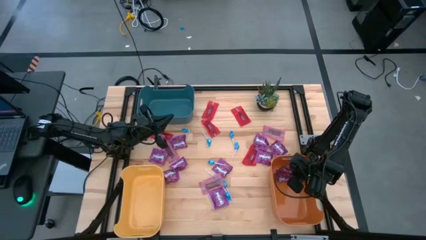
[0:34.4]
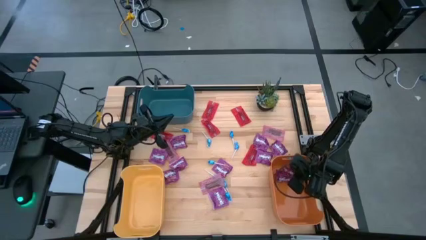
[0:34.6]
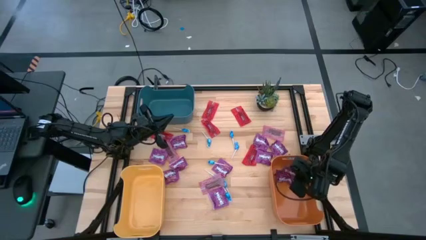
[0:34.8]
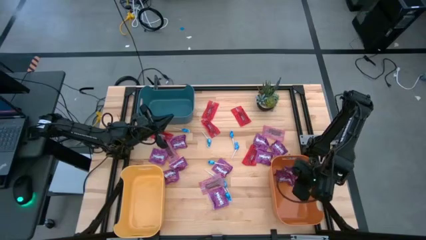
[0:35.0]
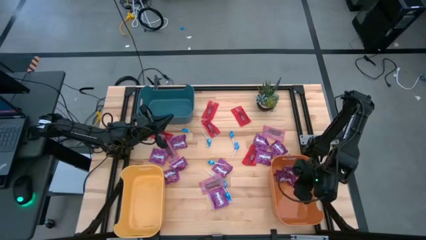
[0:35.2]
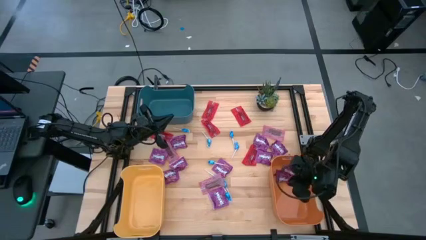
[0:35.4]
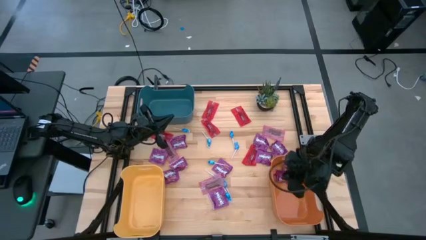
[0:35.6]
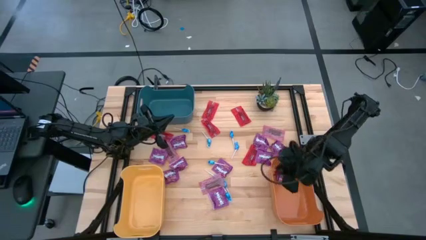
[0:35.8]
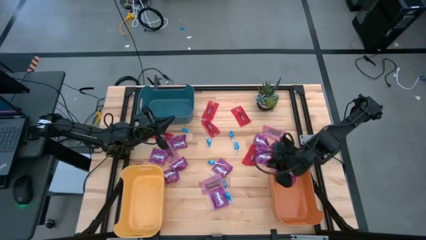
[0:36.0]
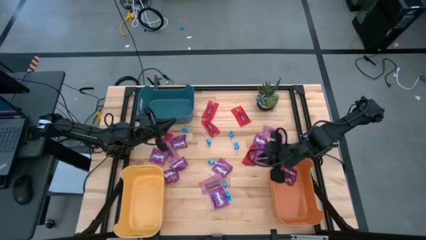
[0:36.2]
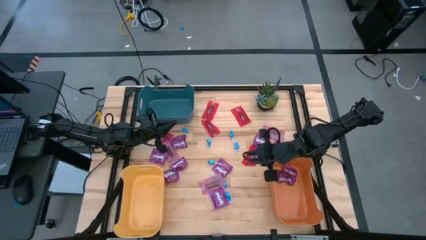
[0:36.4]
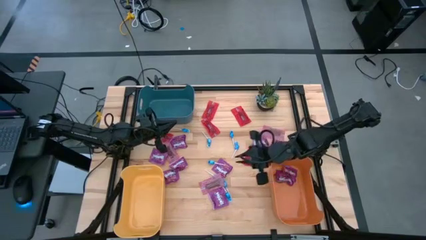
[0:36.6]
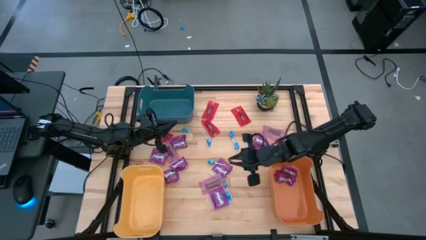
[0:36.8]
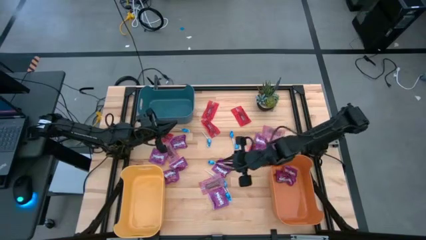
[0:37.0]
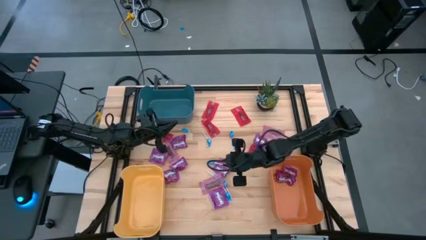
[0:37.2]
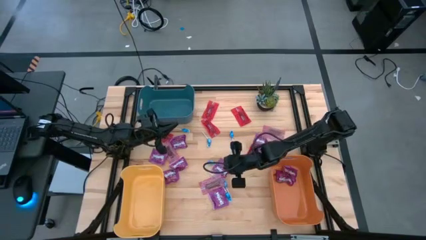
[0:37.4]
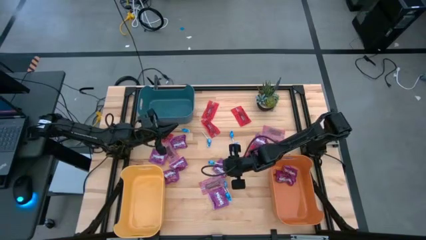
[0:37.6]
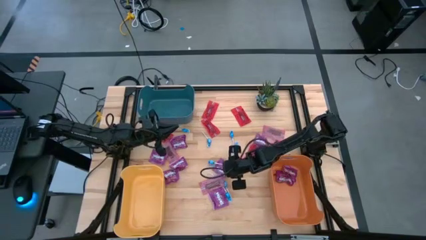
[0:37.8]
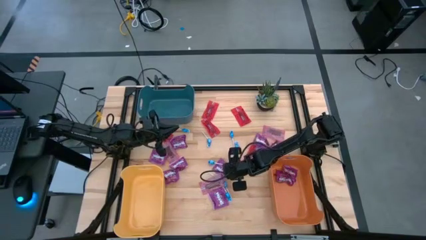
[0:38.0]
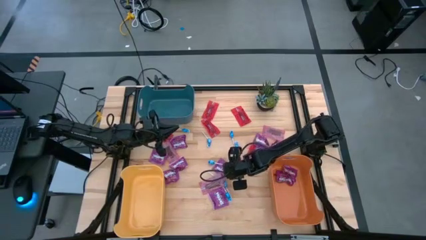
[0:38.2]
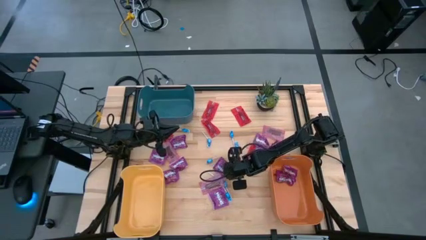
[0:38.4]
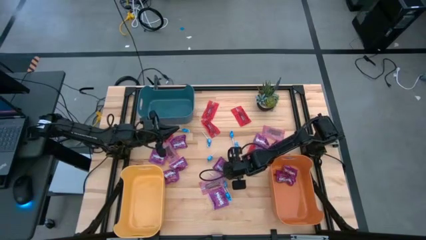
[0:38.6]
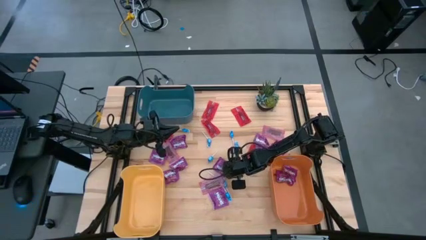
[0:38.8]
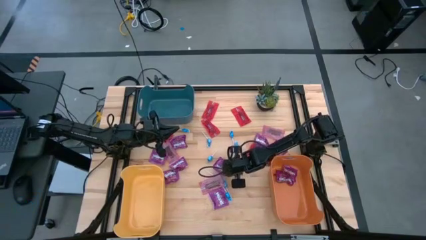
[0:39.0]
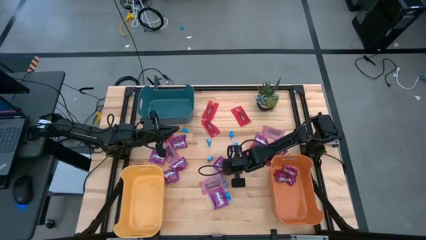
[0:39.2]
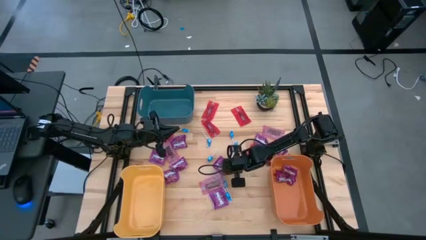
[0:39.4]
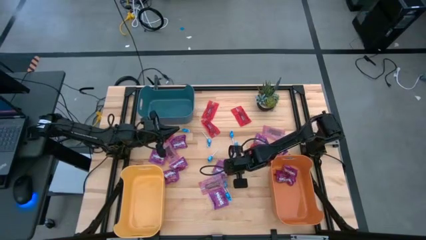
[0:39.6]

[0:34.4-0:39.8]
Task: Sort candy
Put the purple candy into the orange bin

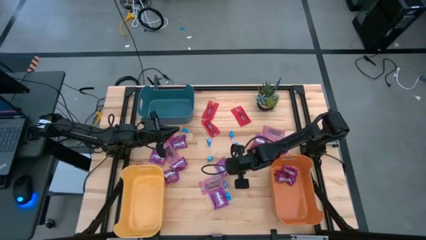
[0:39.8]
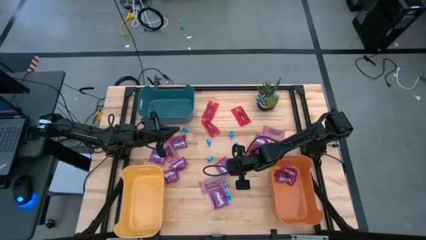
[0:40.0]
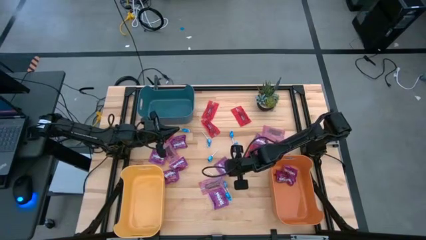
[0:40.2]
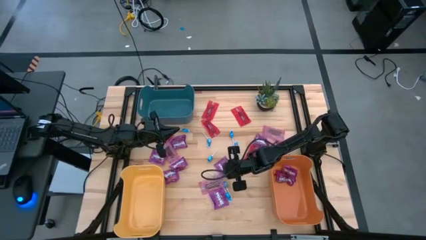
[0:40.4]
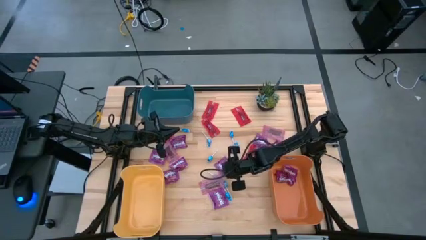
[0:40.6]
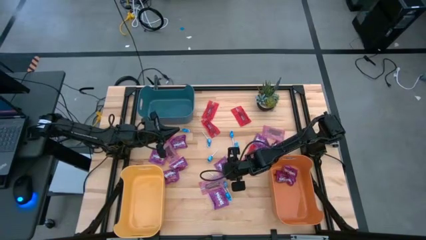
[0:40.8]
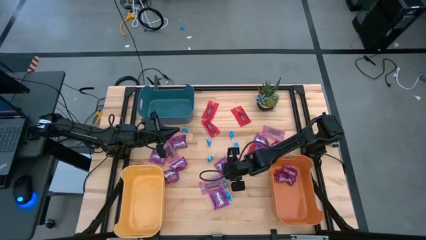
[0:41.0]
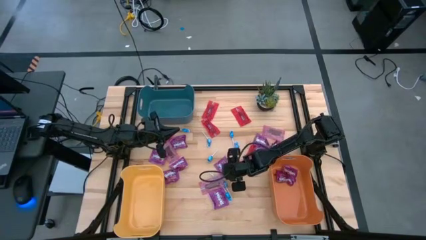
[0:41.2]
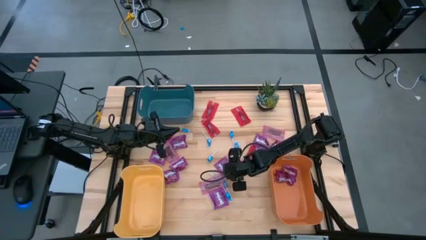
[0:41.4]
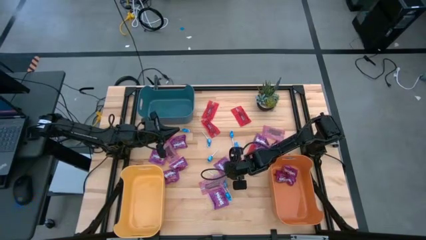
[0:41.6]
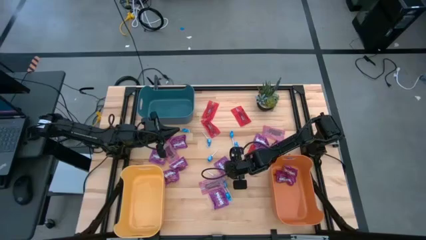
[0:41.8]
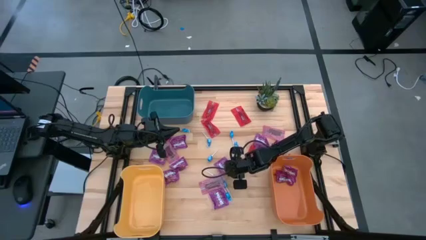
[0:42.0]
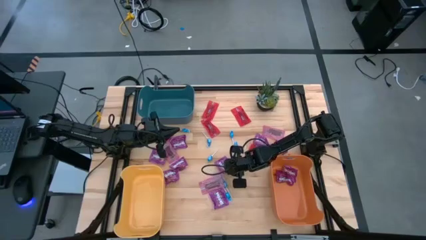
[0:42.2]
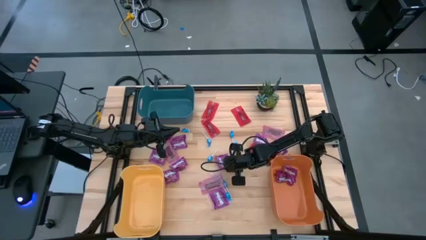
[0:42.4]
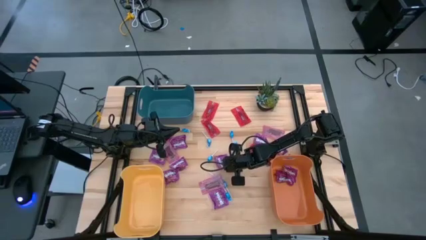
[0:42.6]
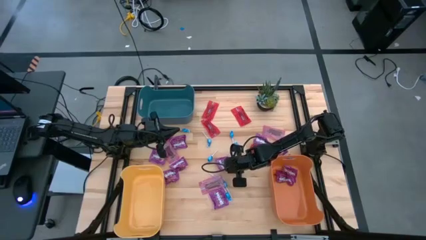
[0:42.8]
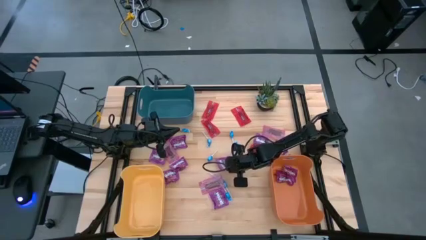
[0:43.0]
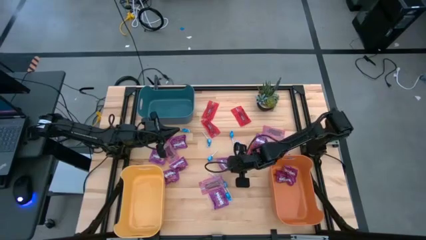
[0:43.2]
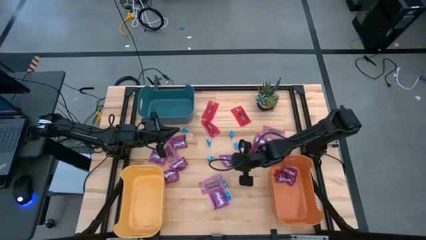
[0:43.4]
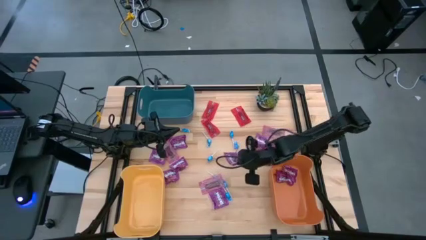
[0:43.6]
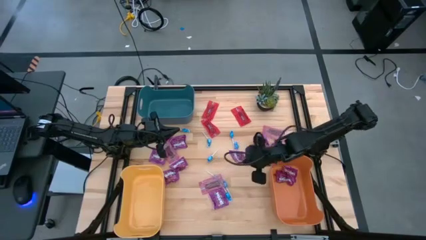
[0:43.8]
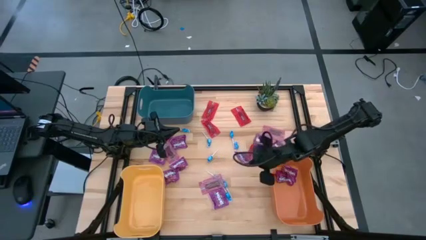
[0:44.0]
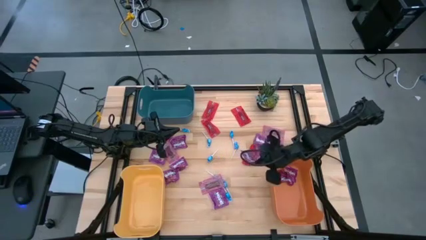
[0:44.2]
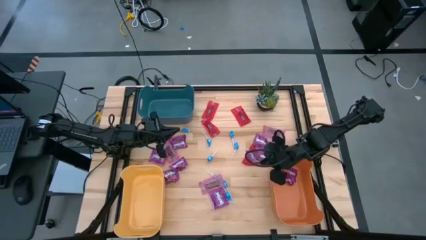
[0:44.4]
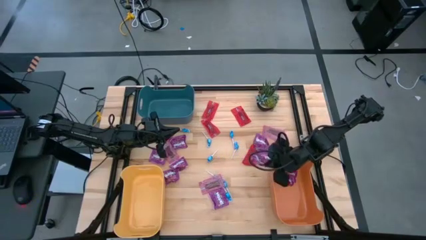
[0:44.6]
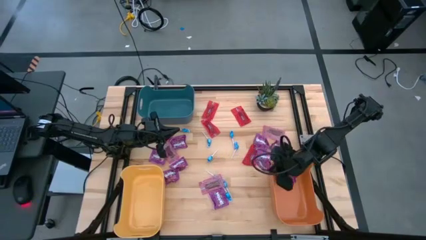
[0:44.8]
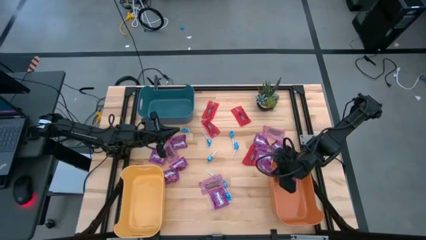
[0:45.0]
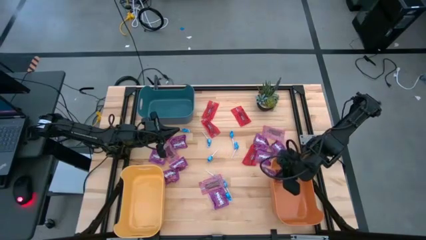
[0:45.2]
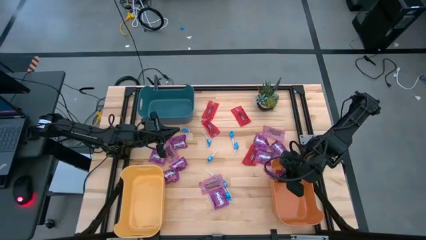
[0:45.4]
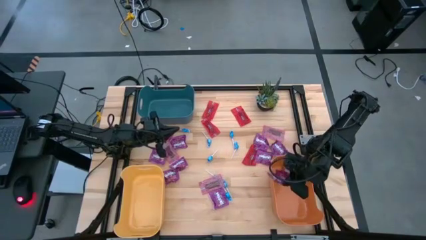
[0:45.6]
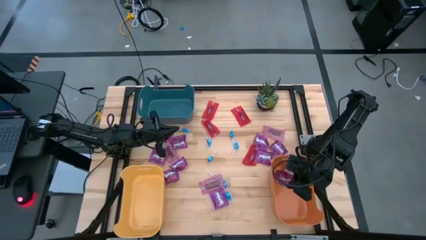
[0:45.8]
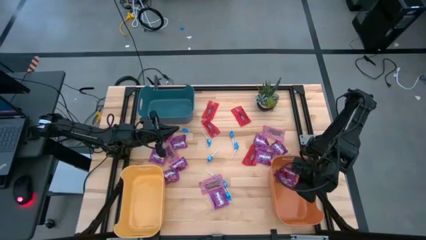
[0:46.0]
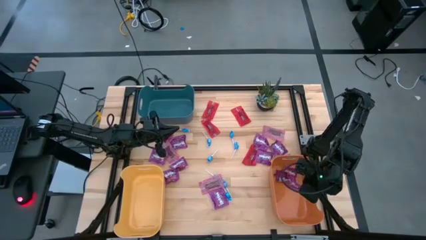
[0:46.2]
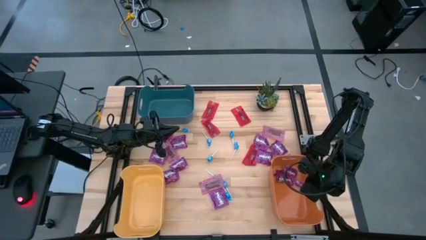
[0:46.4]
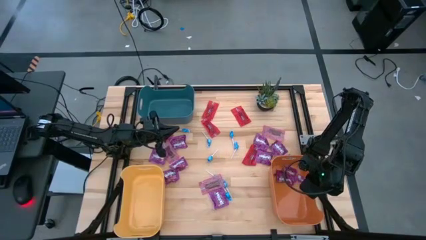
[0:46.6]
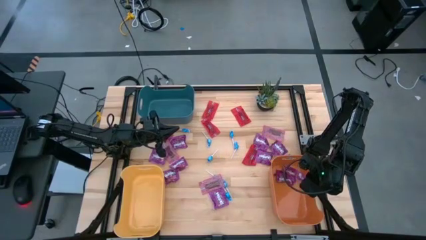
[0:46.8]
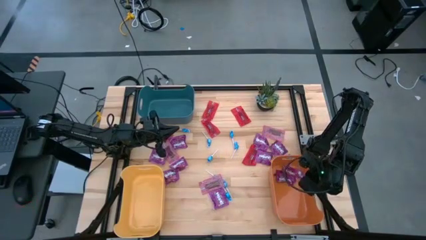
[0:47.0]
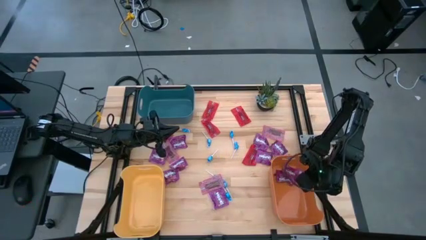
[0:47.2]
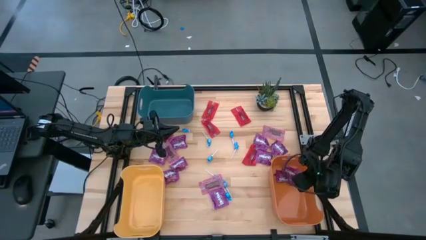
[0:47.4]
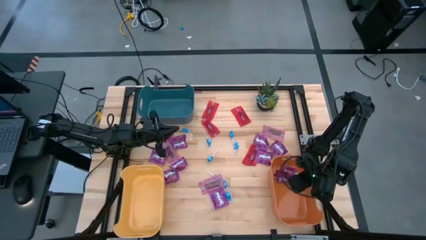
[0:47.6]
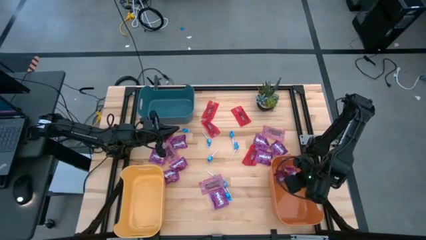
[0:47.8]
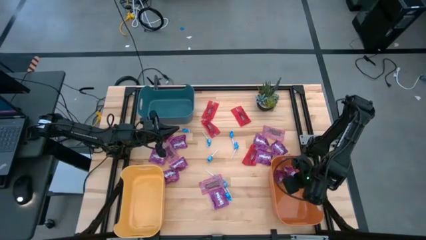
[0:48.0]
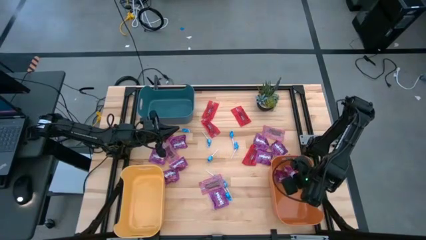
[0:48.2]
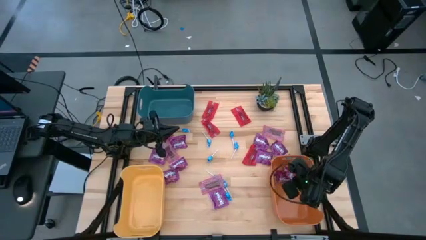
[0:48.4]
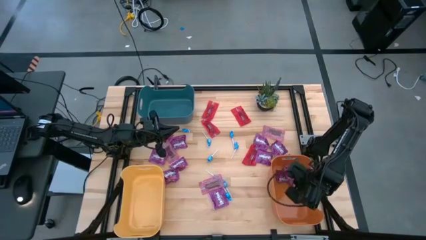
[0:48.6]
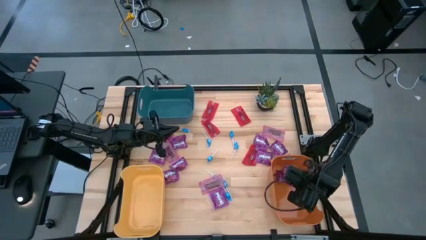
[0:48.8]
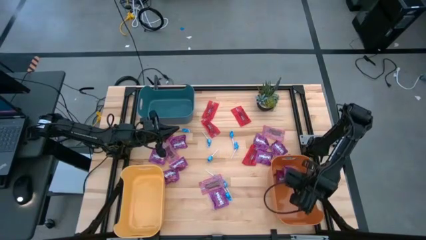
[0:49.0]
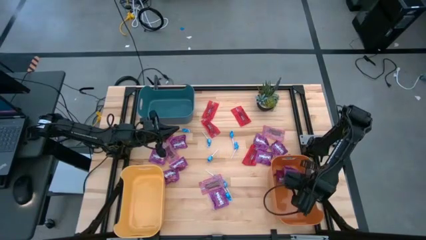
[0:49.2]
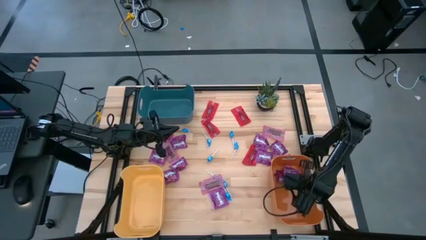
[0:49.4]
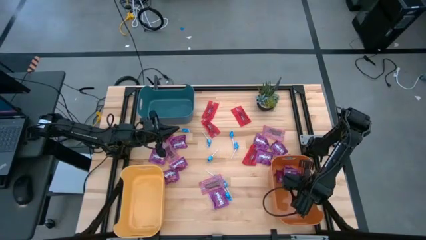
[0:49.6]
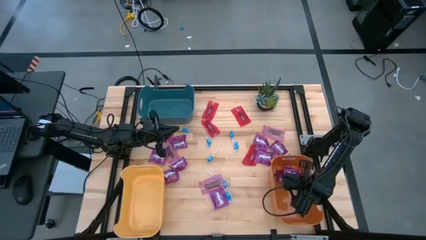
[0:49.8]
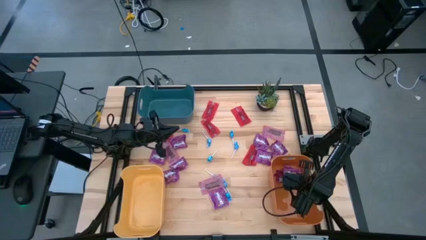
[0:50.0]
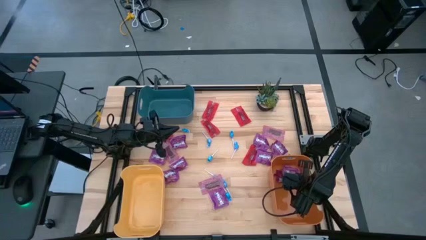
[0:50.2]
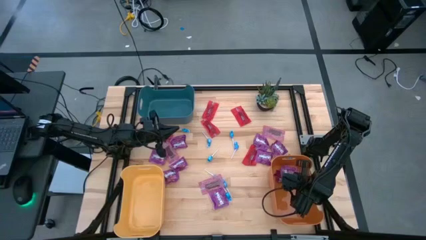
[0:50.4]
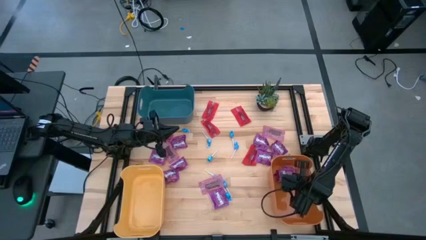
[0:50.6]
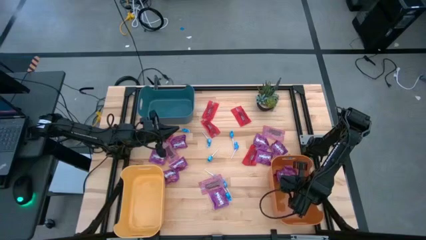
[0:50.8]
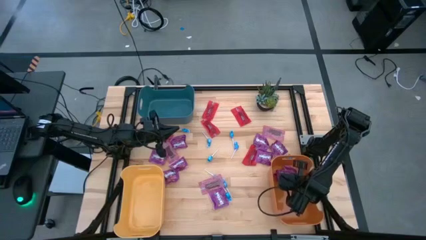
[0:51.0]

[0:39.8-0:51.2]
Put the purple candy into the orange bin

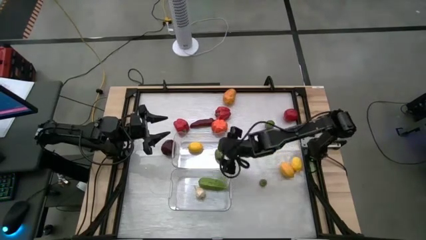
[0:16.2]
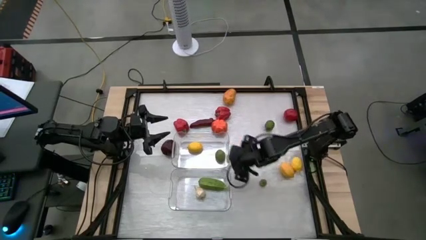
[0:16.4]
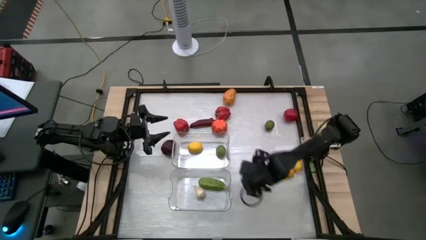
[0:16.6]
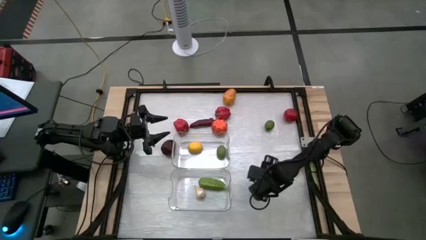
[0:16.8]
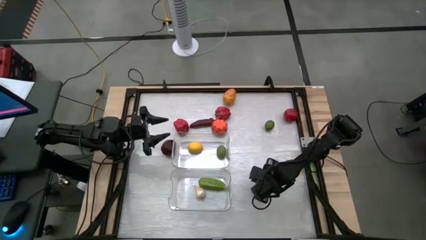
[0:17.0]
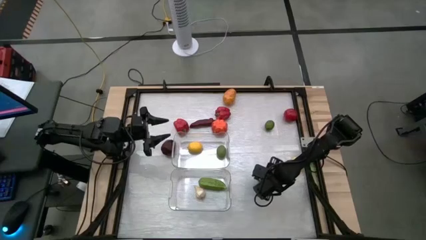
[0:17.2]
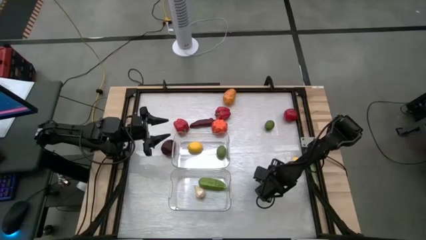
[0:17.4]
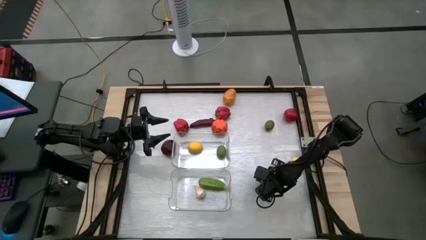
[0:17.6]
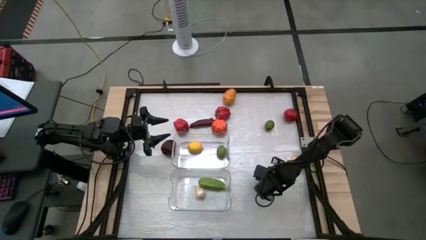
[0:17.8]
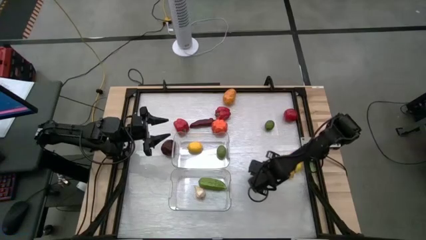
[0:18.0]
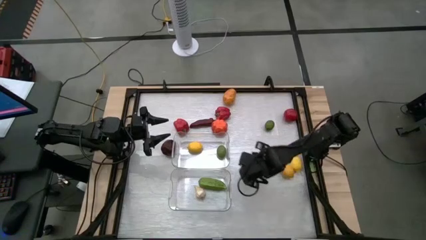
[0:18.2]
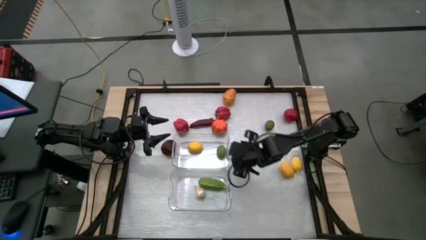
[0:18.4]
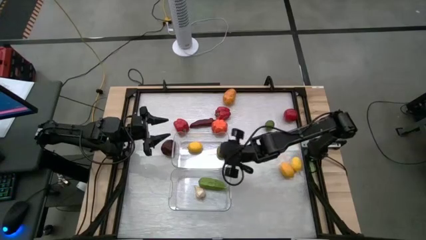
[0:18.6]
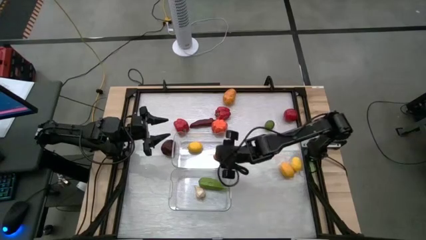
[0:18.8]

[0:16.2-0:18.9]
Task: Sort produce into baskets
Put the strawberry into the top transparent bin
